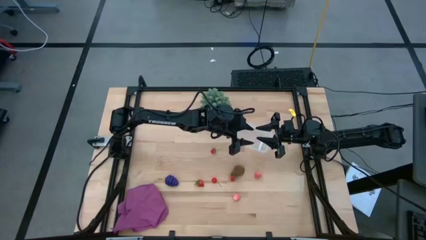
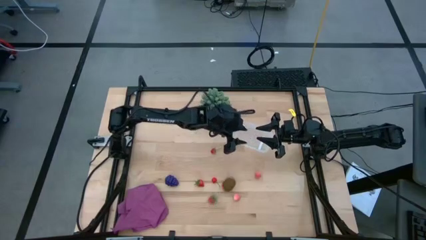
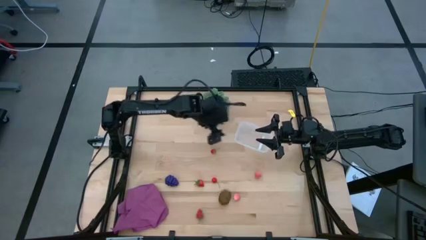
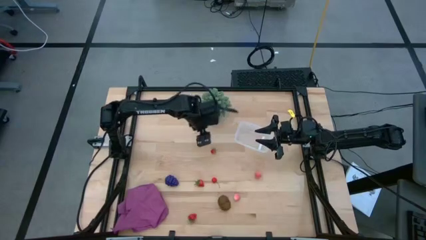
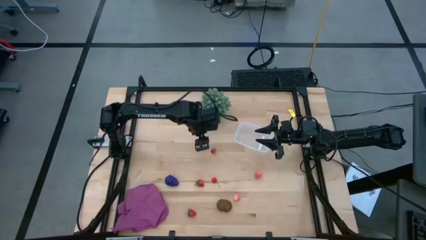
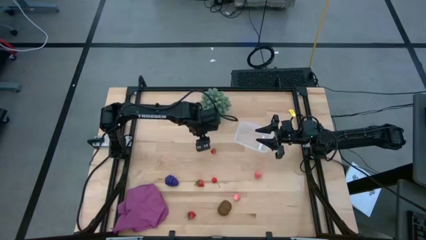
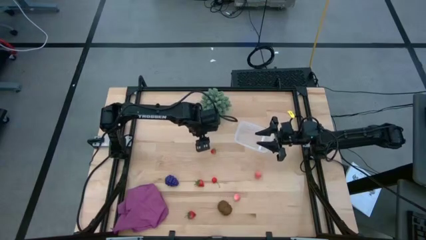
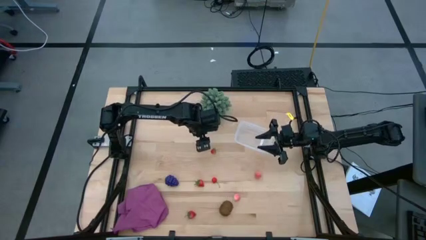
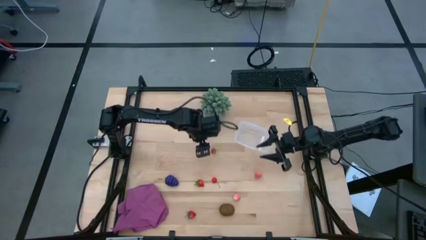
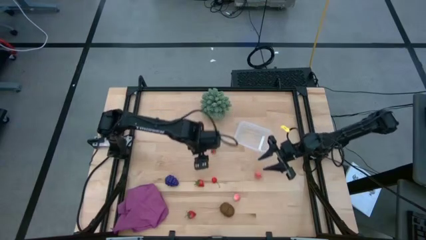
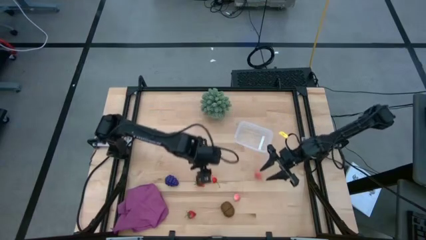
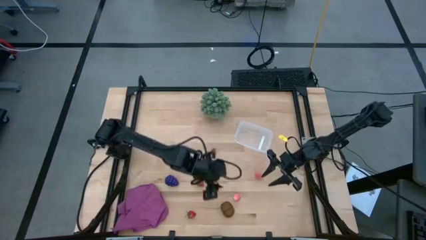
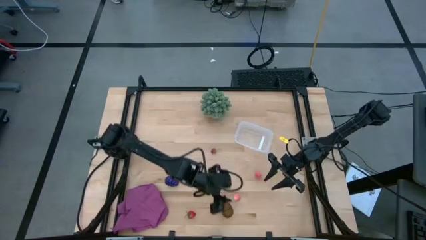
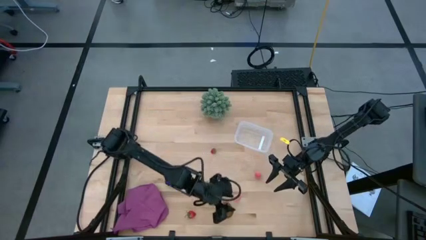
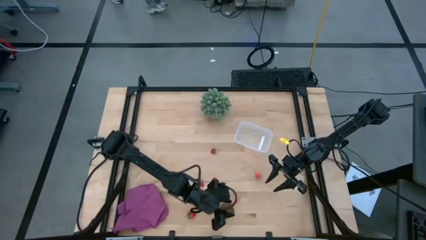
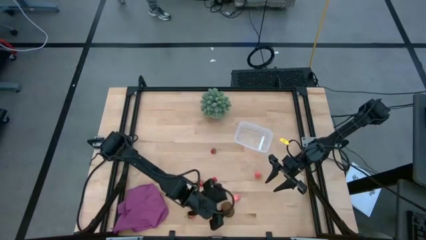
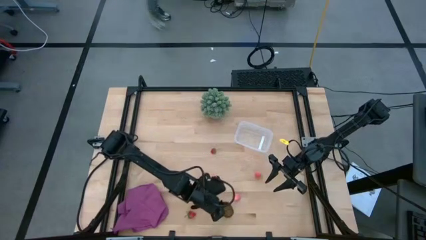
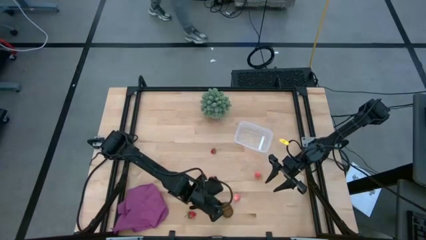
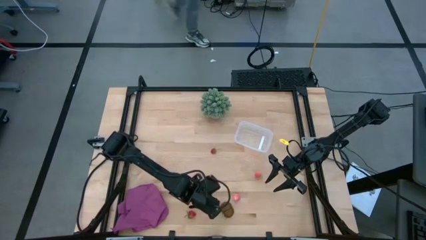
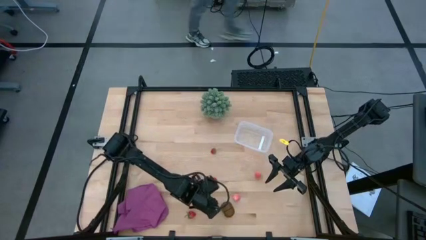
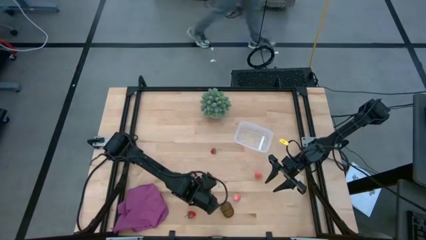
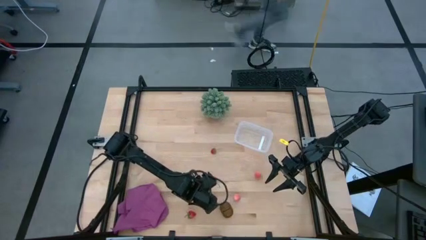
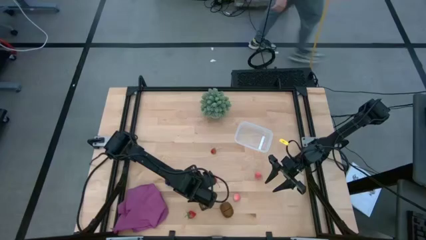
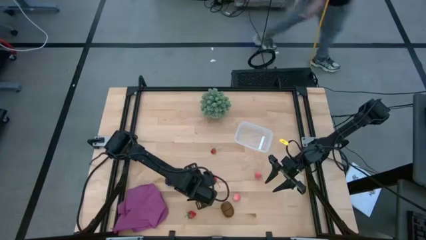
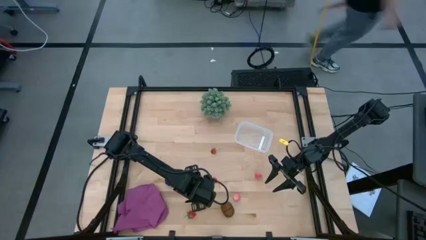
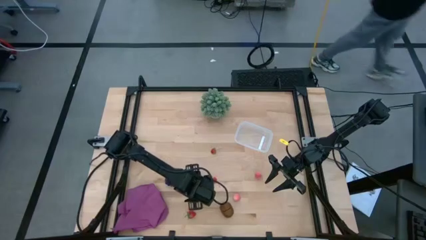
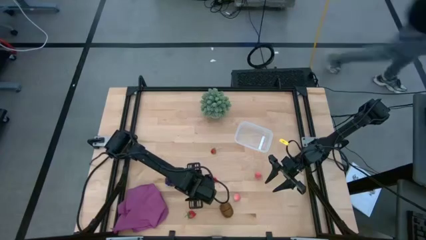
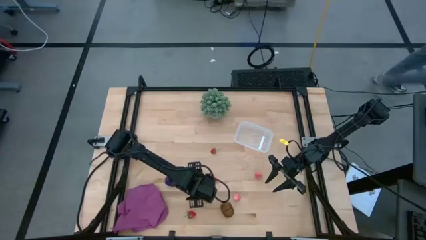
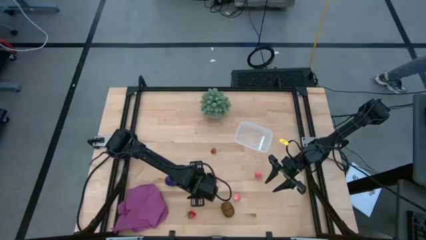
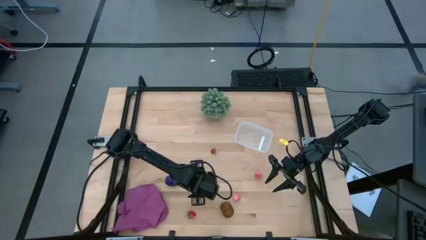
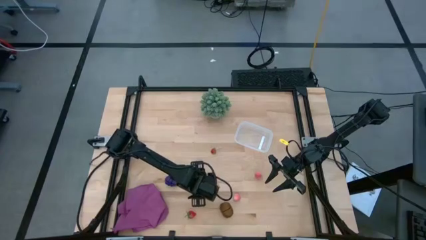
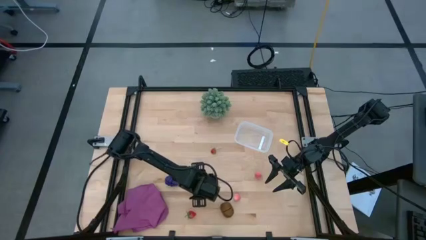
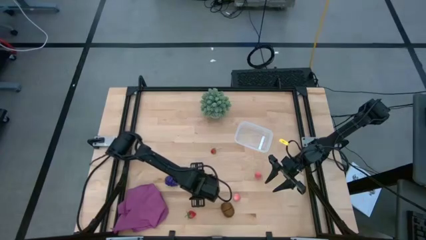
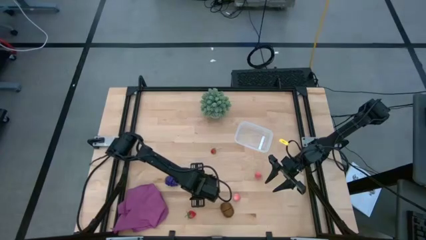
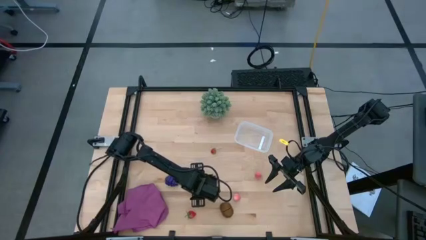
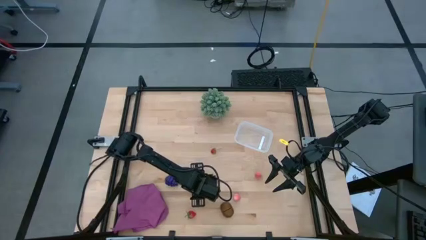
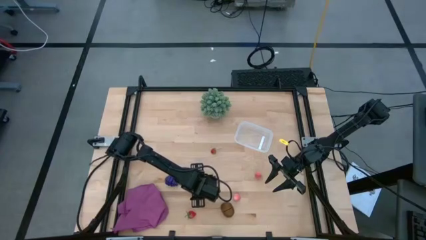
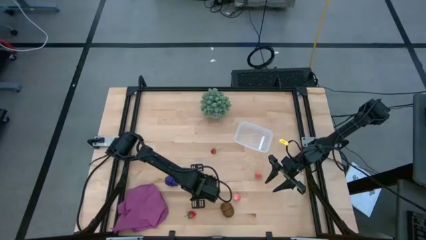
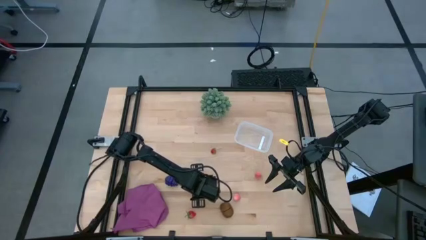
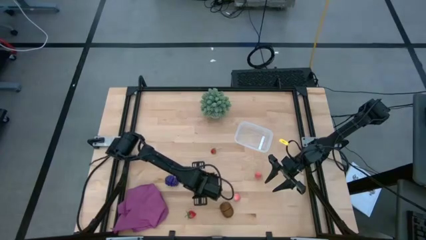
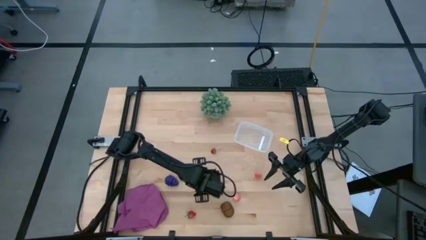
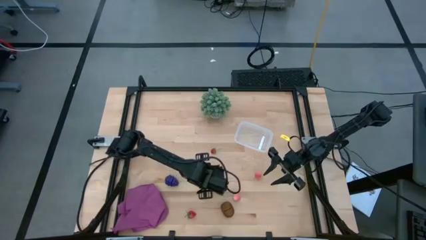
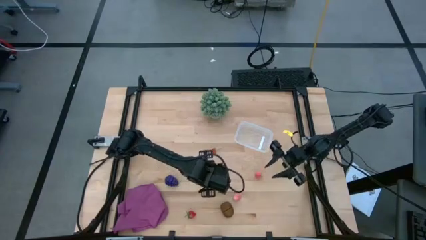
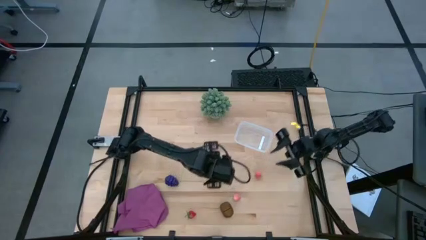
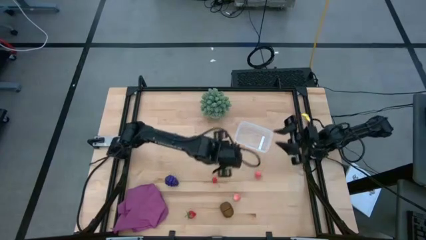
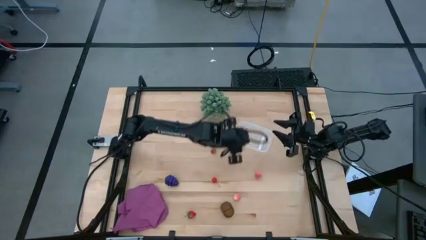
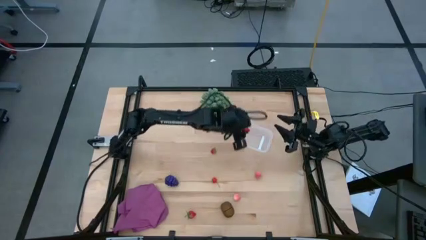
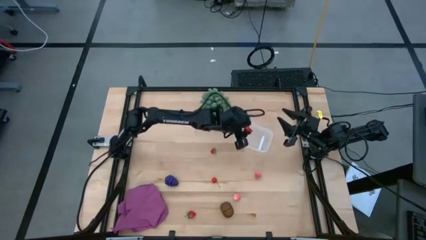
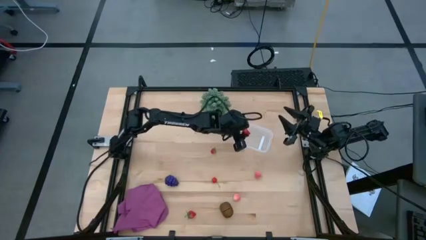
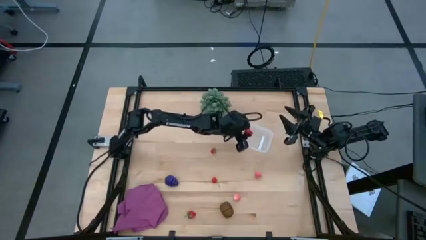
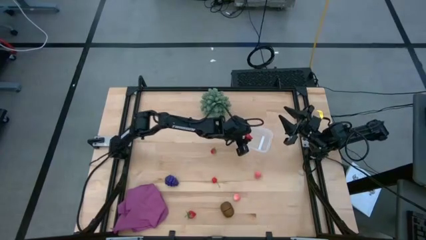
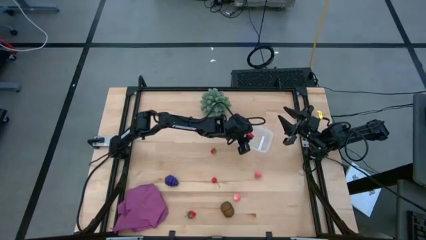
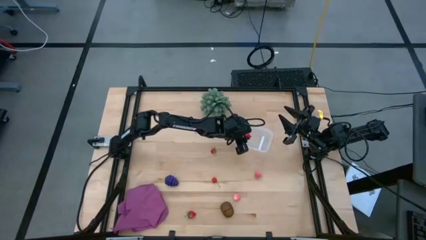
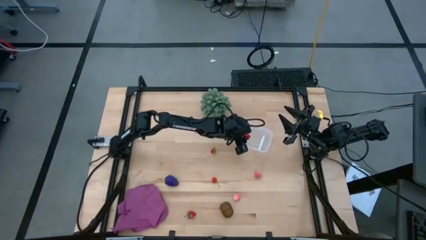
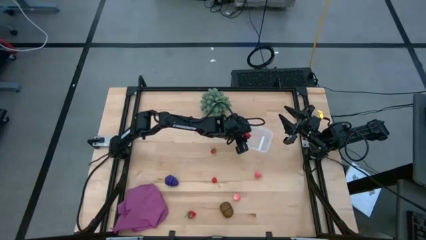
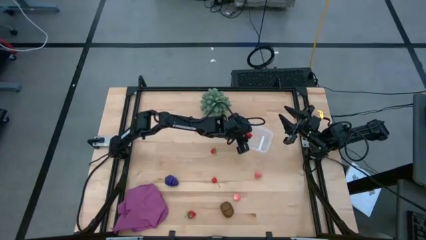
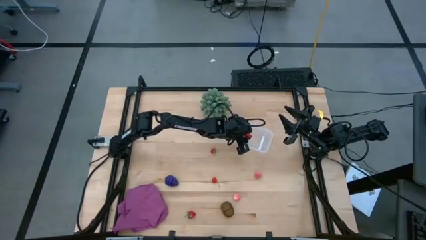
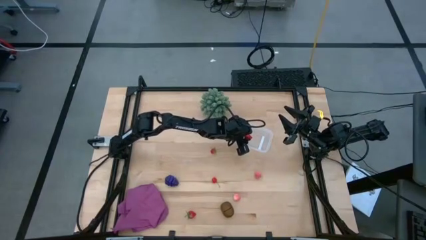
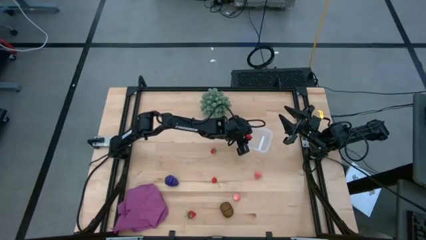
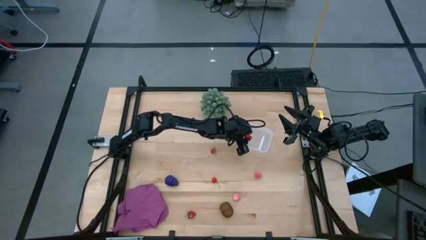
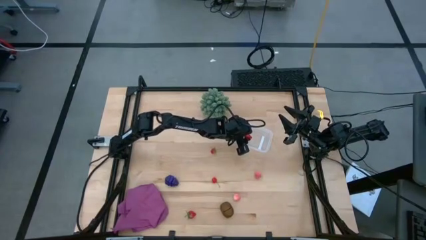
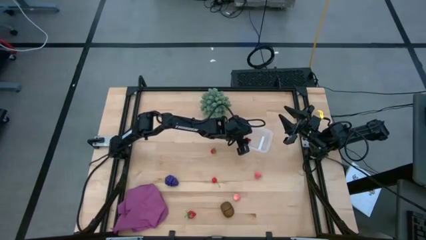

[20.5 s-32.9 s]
Task: Pick and placing Produce into tupperware
Put the red strawberry into the transparent bin

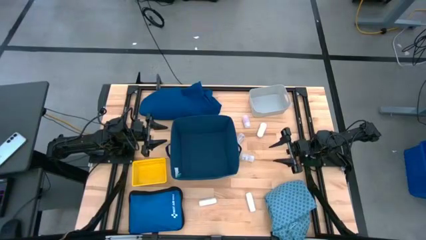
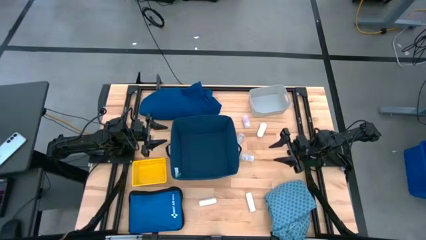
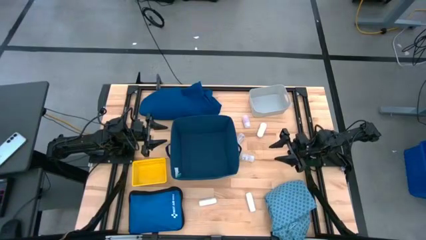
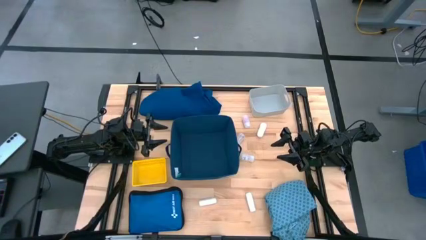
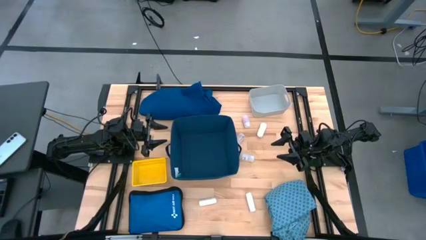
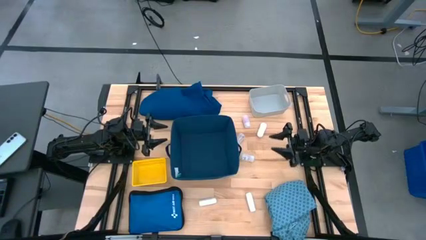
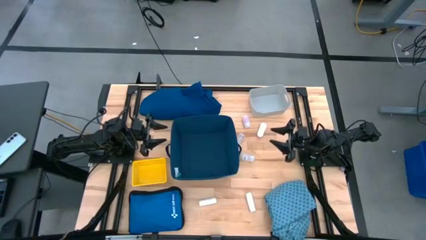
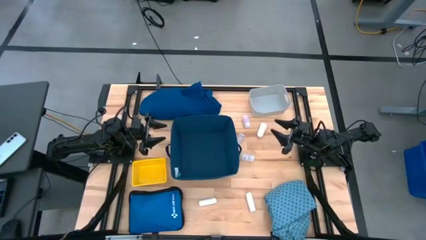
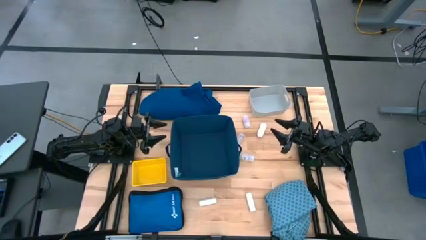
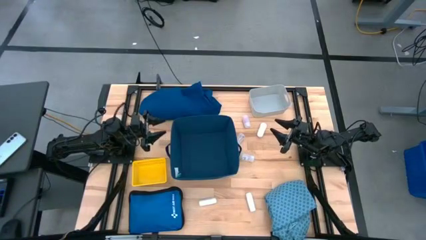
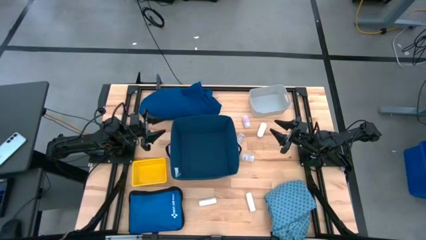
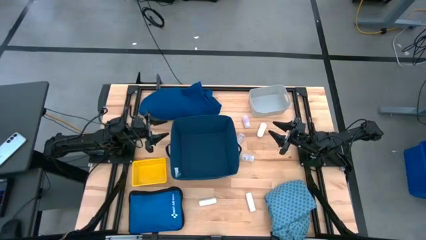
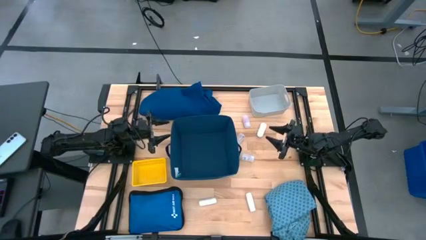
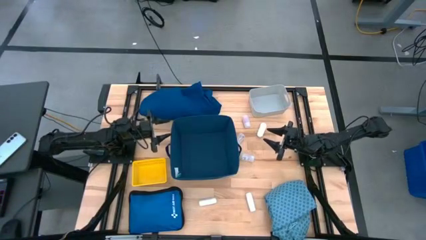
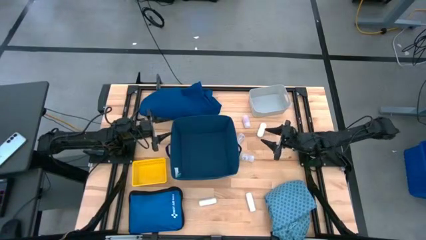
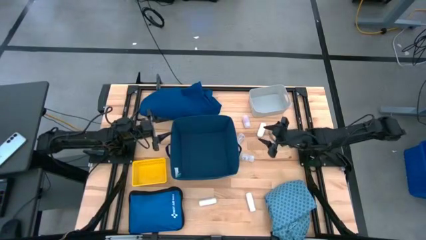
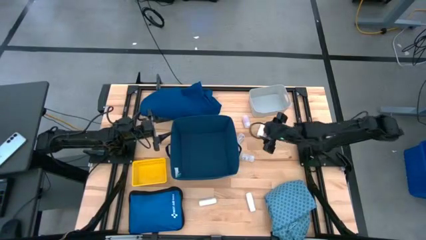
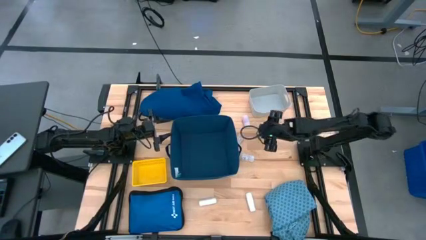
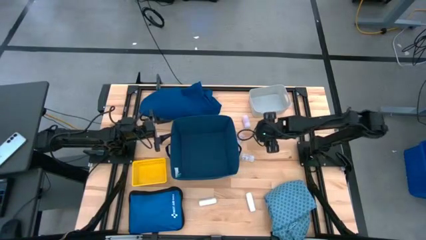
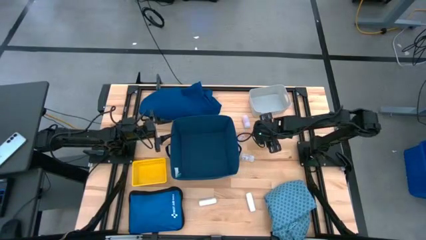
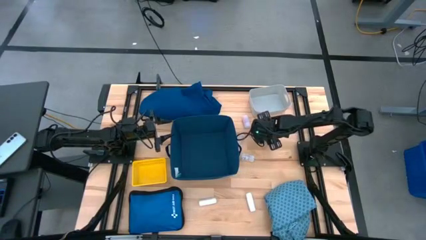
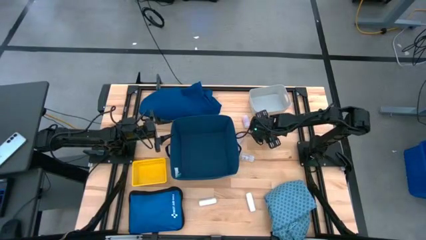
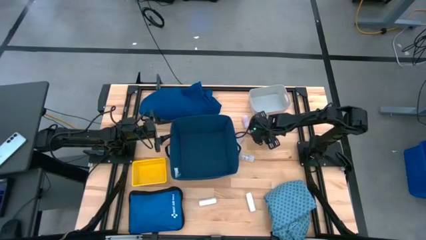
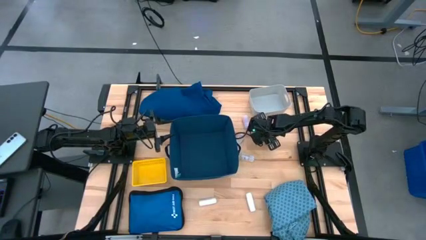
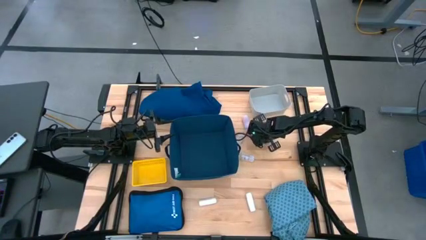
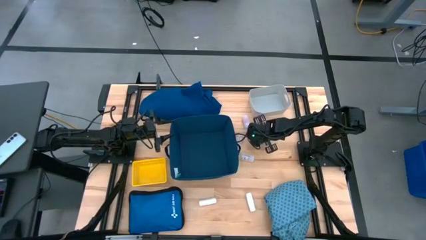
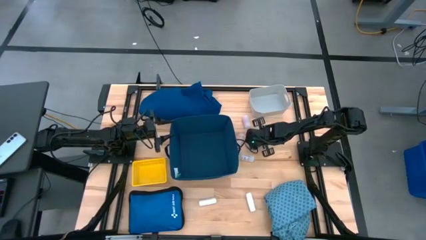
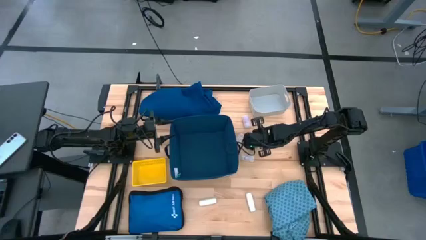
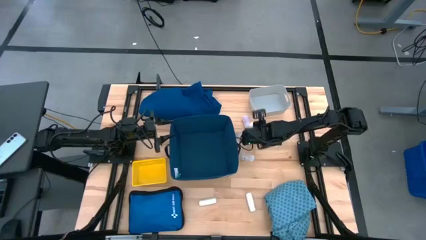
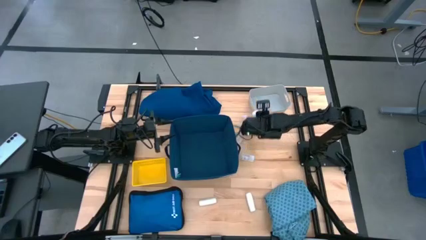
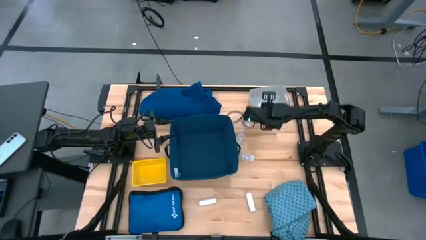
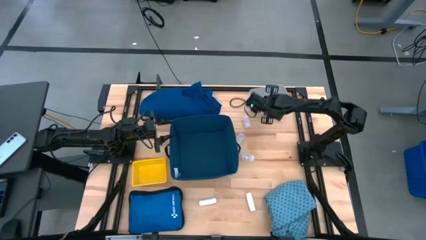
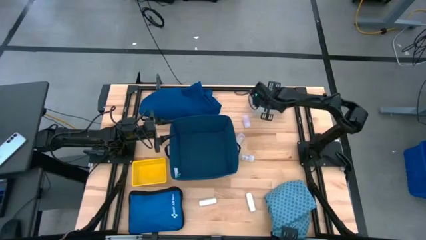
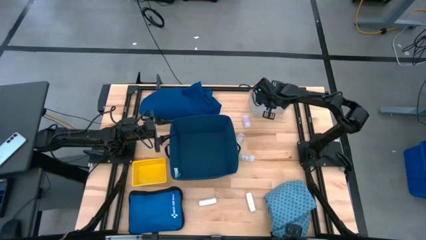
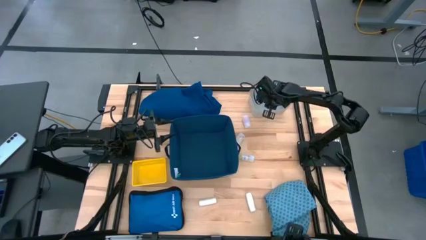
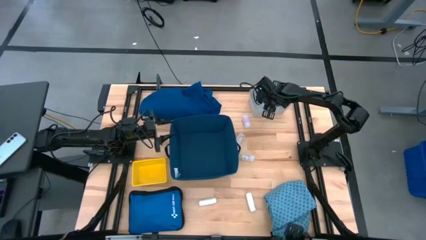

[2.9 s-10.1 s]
Task: Pick & place medical supplies in basket/bin
Put the top white roll gauze into the gray bin
